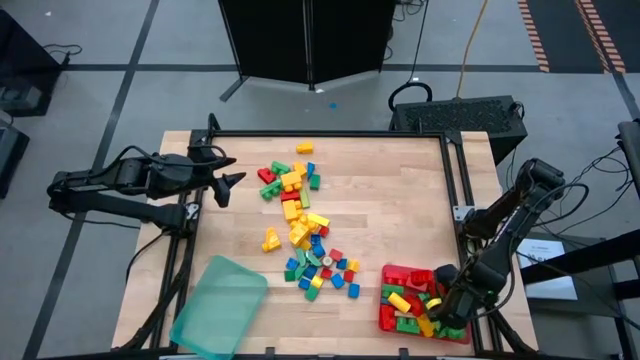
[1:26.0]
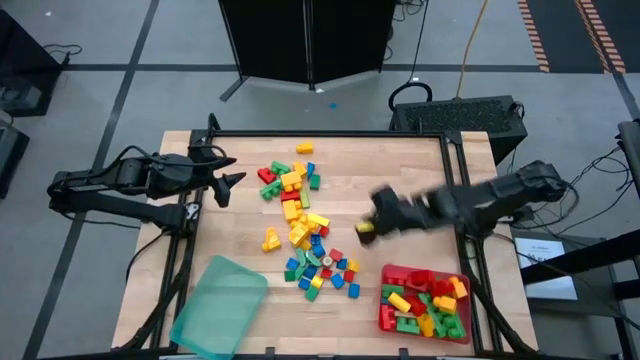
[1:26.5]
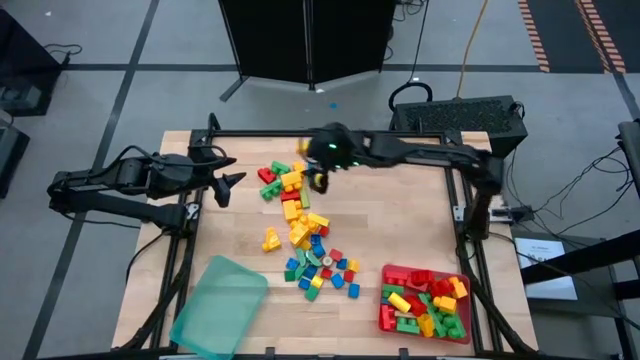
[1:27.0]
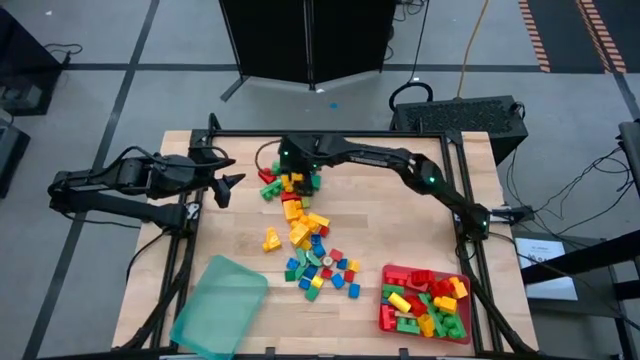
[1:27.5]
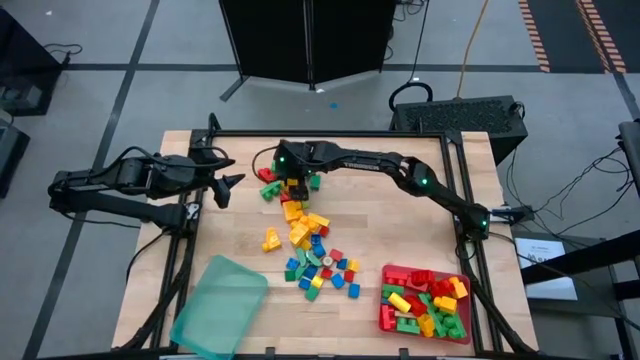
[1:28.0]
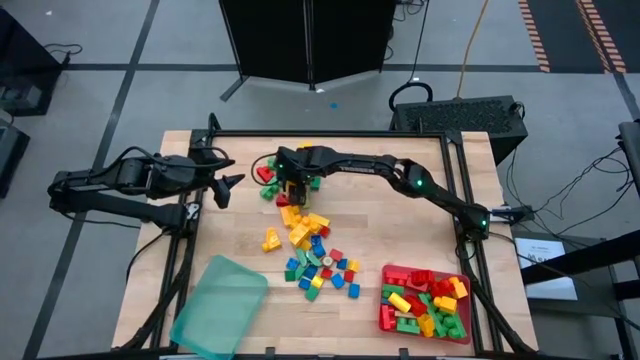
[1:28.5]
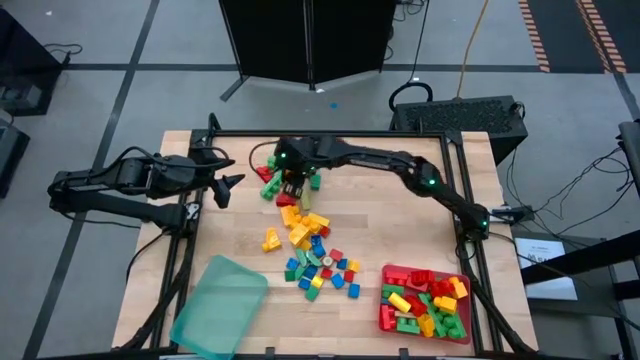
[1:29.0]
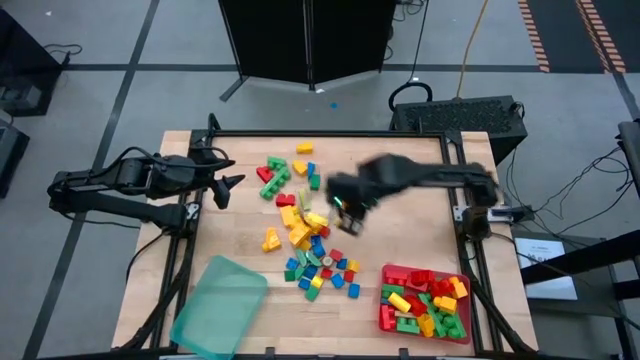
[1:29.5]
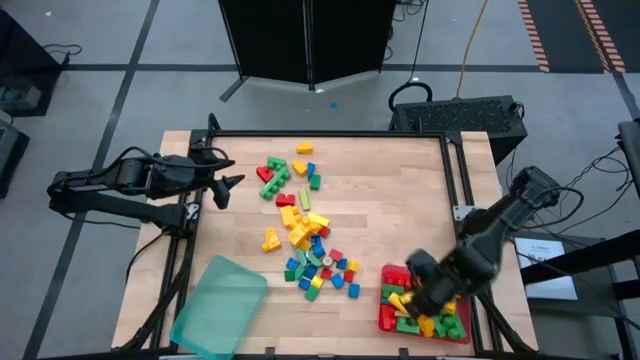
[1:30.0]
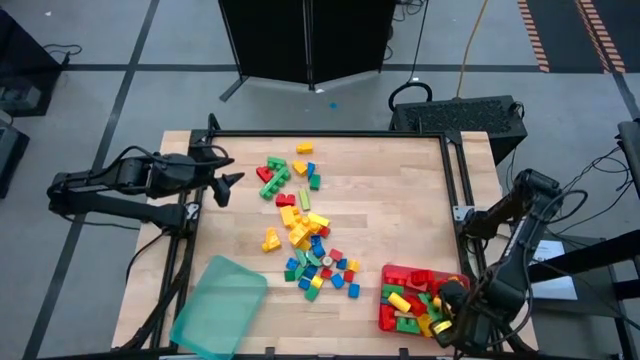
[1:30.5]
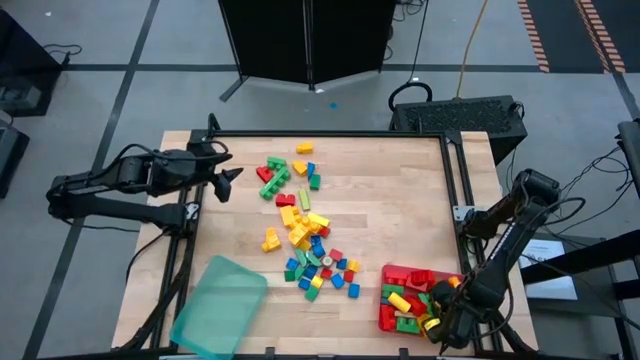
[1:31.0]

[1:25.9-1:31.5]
Task: Sort blocks by size
Put the 2-stud yellow game piece into the pink bin

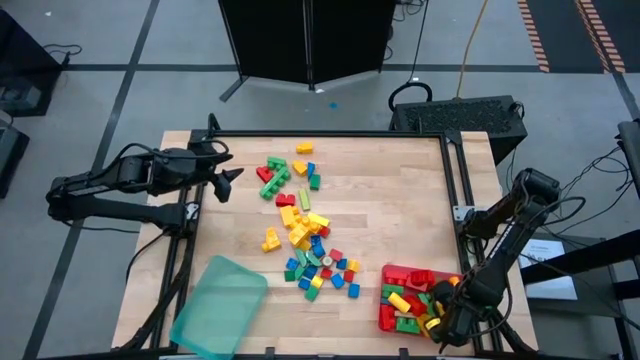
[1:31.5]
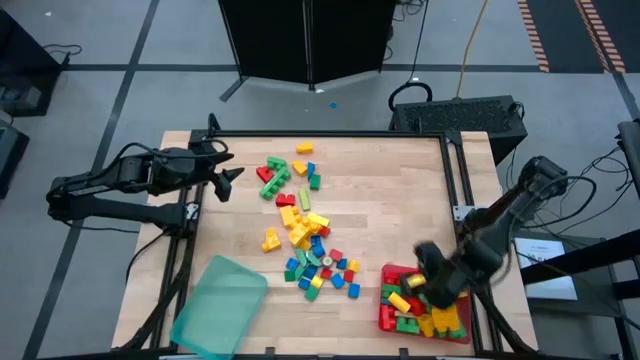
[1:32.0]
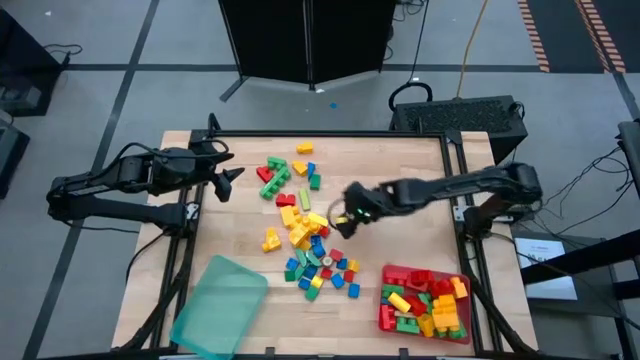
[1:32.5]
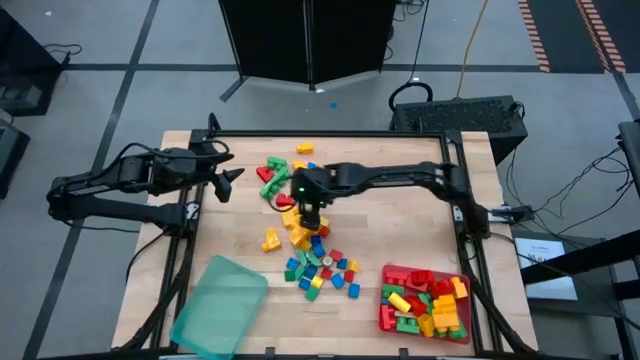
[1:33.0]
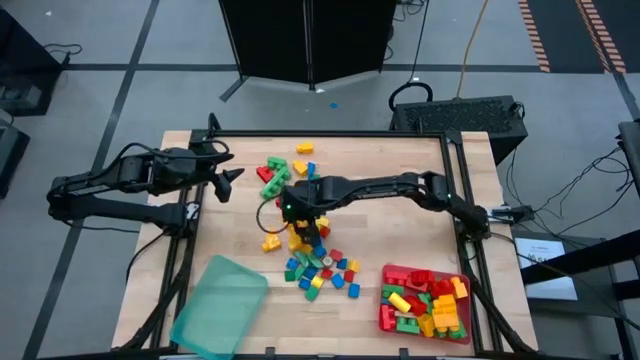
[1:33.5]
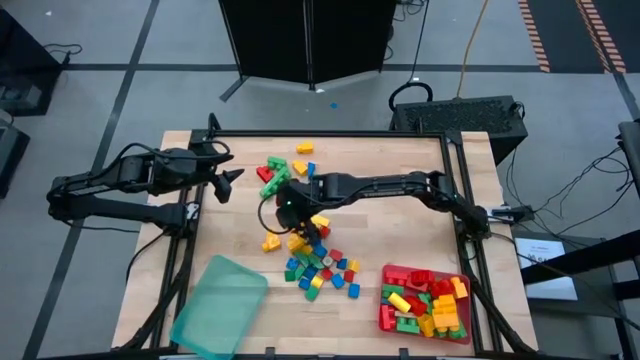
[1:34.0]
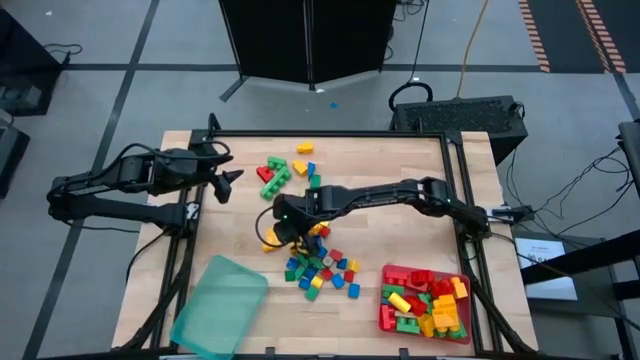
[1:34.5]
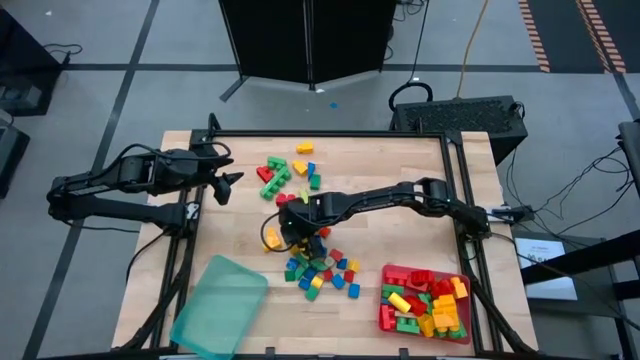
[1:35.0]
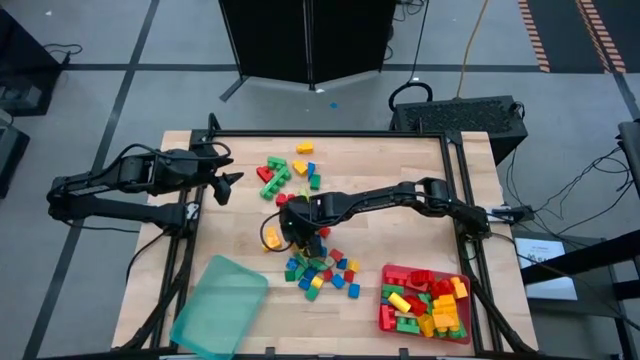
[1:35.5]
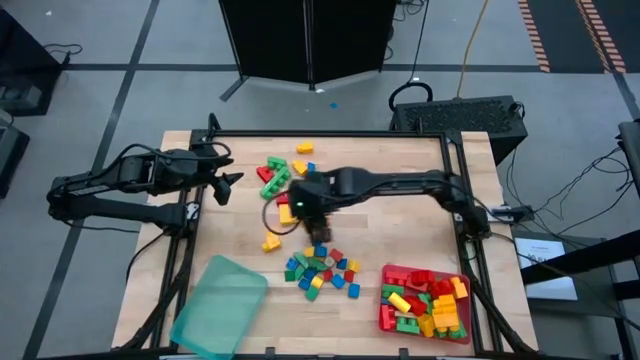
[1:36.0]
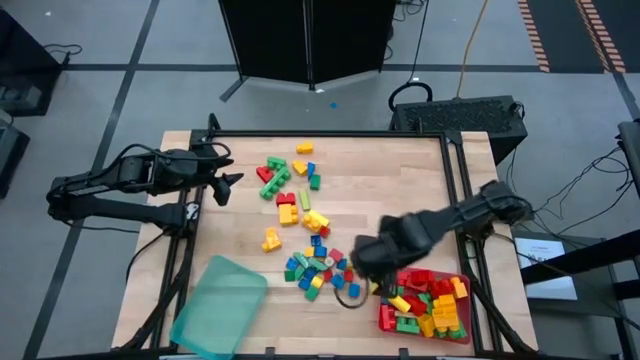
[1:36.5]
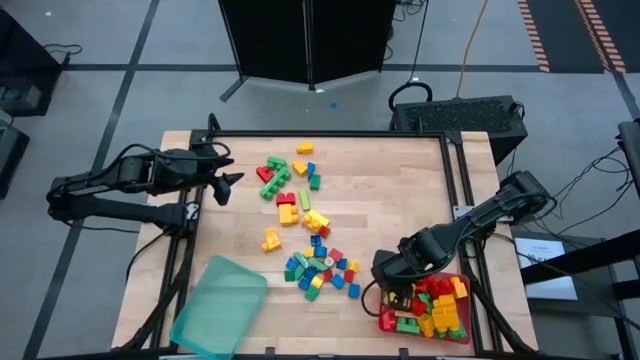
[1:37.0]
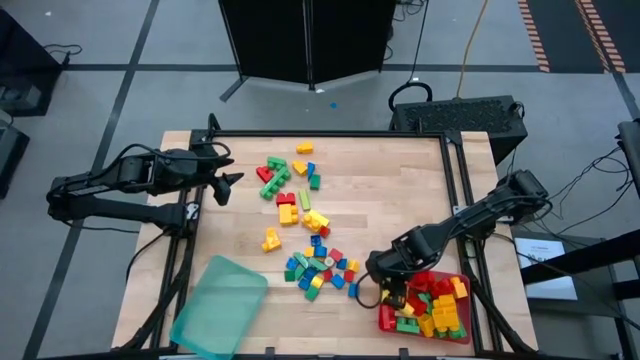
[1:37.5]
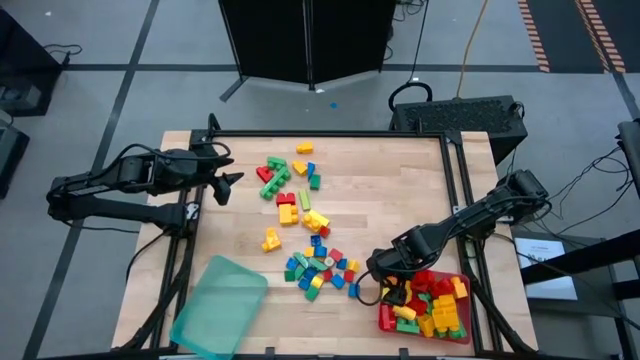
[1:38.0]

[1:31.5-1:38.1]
Put the 1-stud yellow game piece into the pink bin

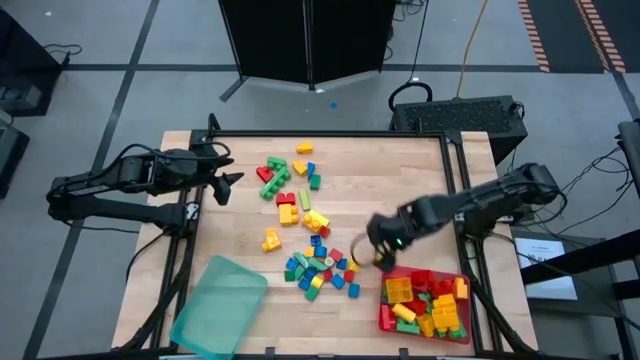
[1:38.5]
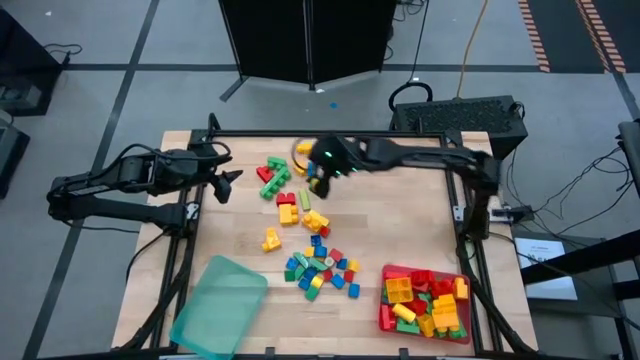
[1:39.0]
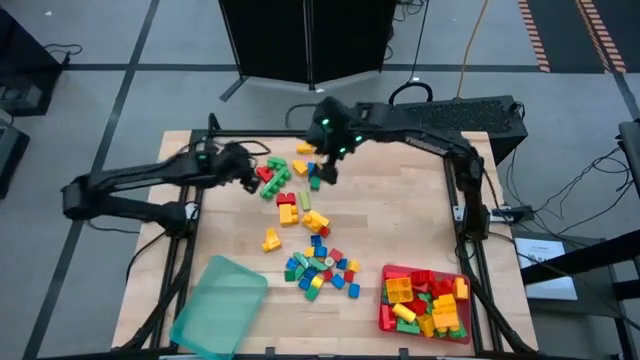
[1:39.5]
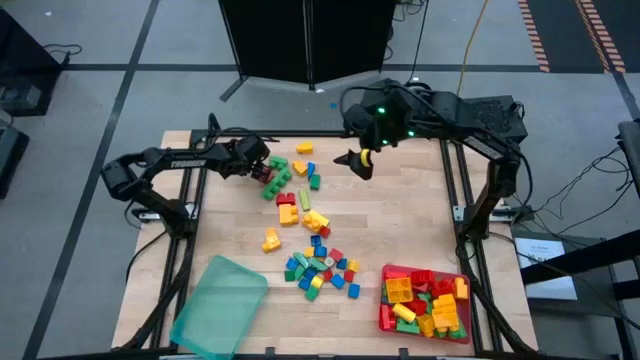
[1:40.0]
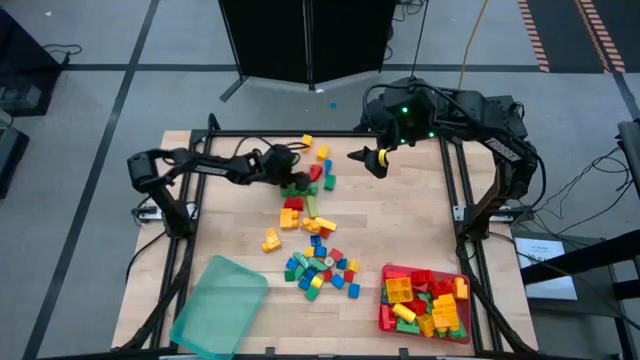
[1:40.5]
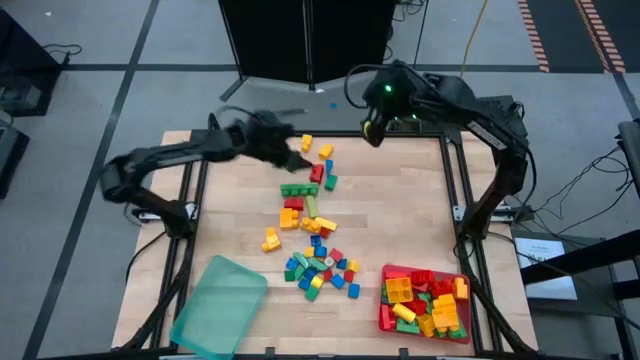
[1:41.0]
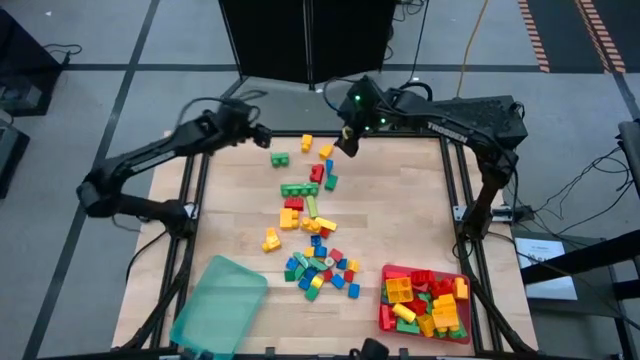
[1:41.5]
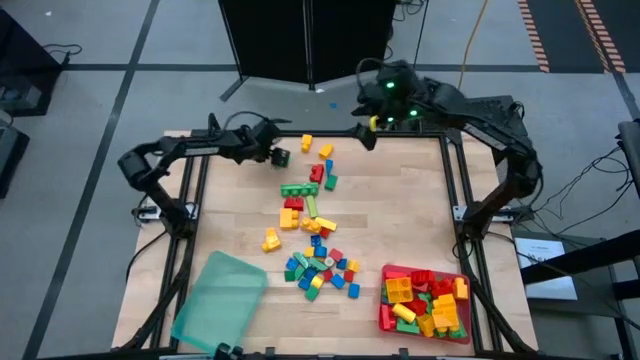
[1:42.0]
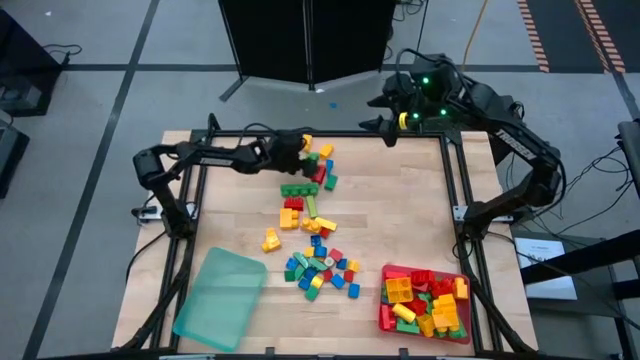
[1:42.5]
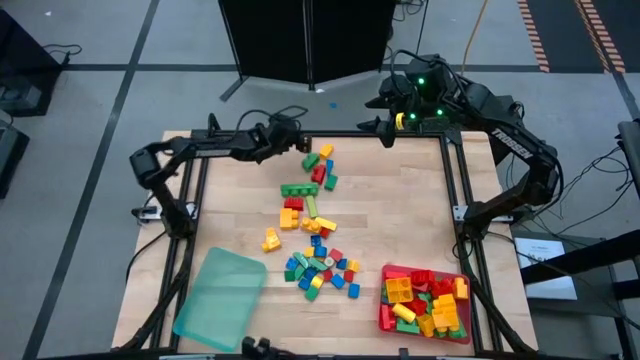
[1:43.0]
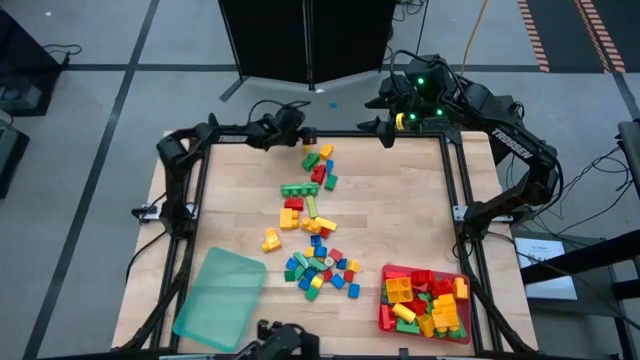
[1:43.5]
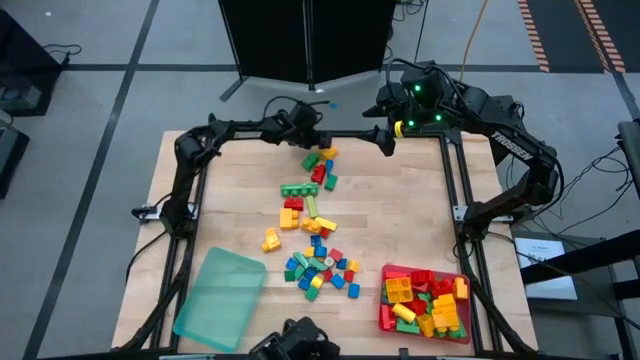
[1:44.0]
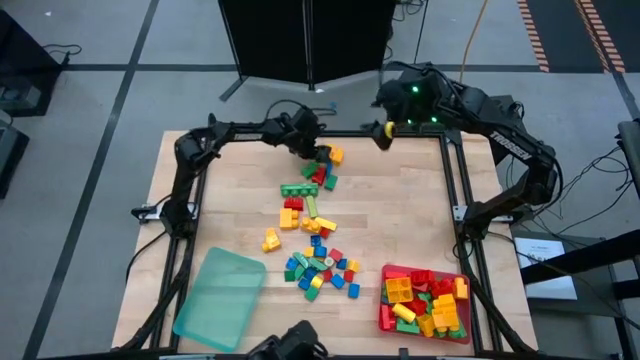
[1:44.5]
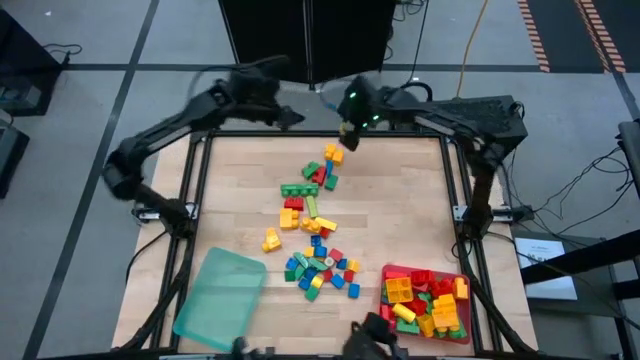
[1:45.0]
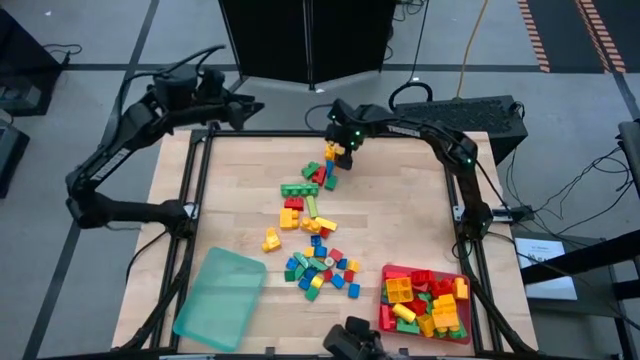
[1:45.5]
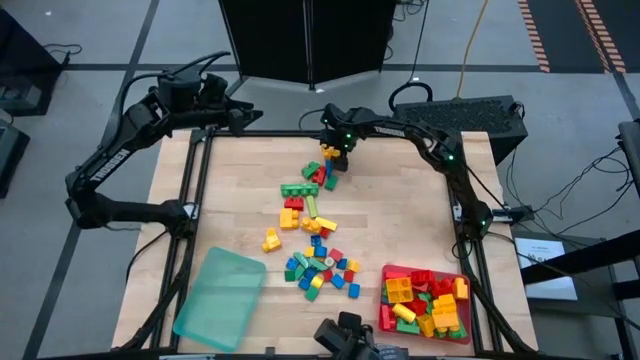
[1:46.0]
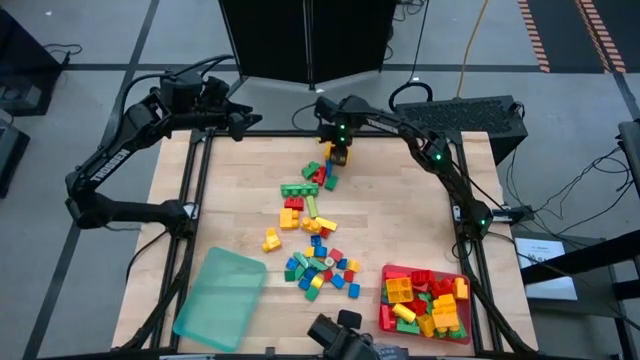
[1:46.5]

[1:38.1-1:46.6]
Put the 1-stud yellow game piece into the pink bin

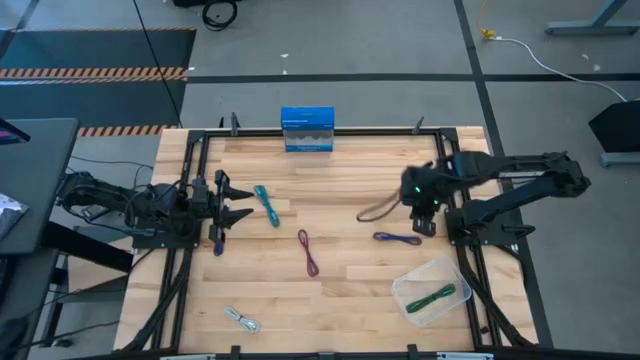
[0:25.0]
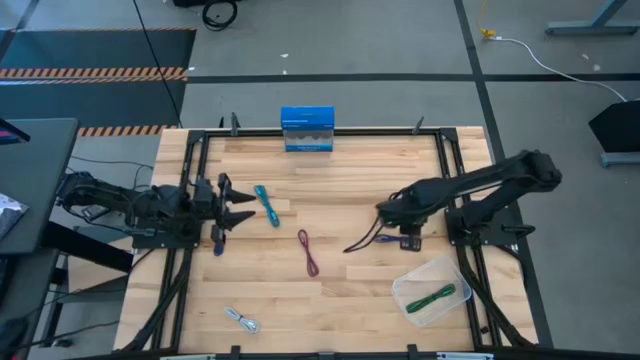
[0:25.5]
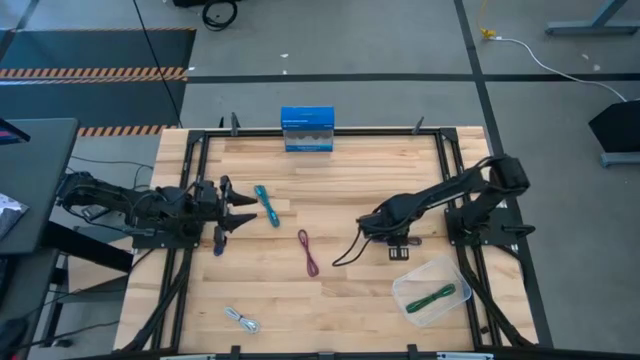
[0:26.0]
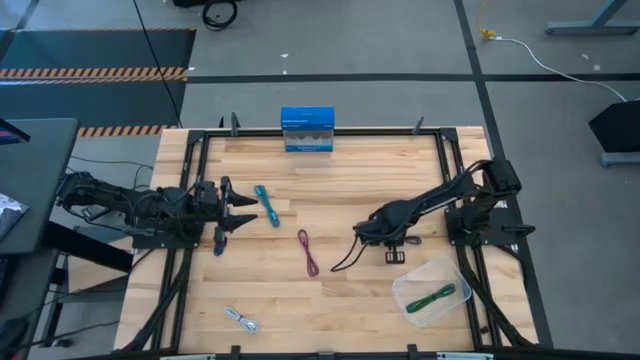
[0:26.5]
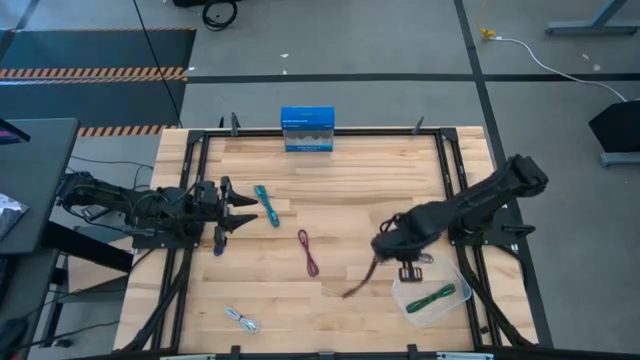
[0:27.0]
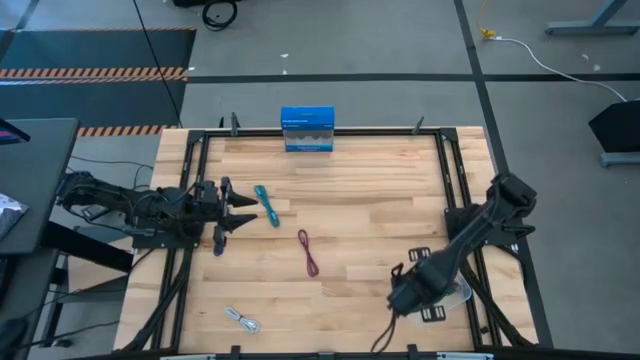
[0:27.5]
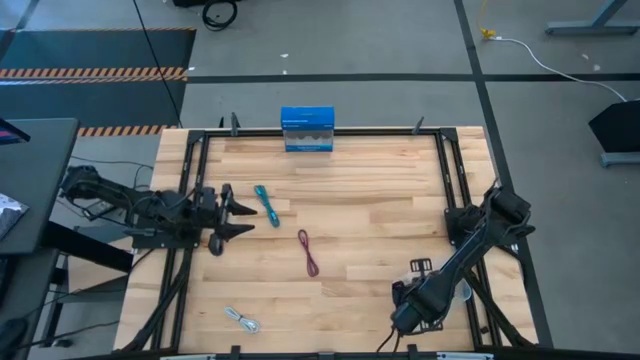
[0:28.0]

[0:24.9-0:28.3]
Task: Pick and place USB-C Cables
Put the right dark blue charger cable into the transparent bin
